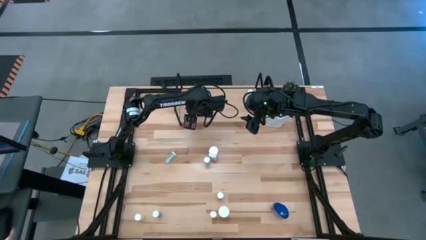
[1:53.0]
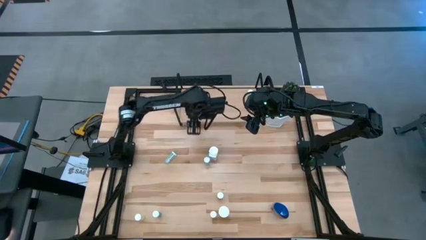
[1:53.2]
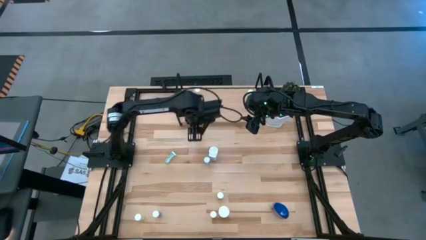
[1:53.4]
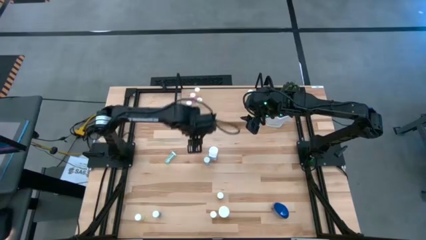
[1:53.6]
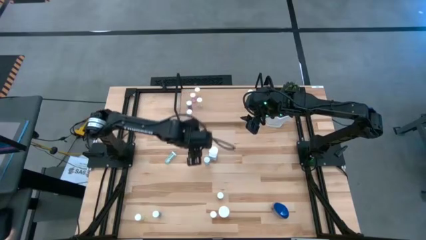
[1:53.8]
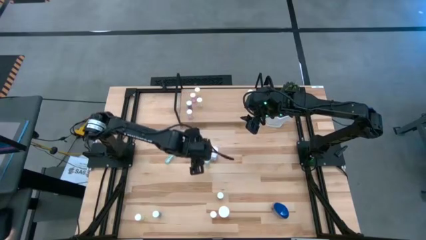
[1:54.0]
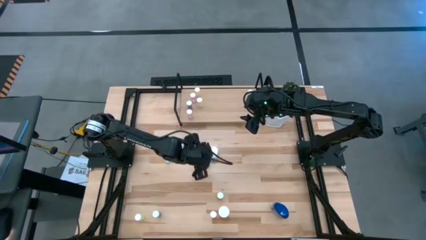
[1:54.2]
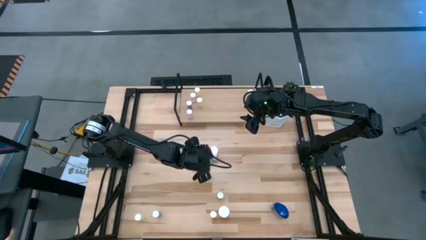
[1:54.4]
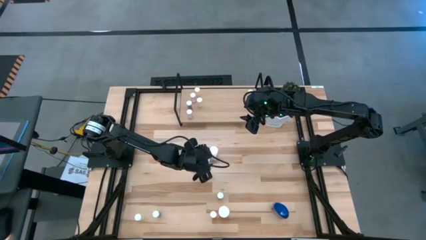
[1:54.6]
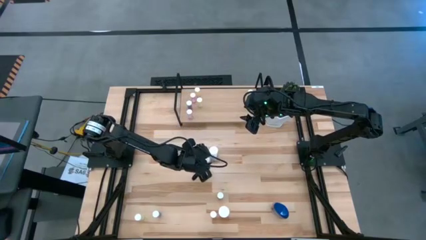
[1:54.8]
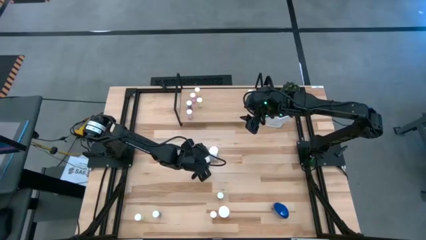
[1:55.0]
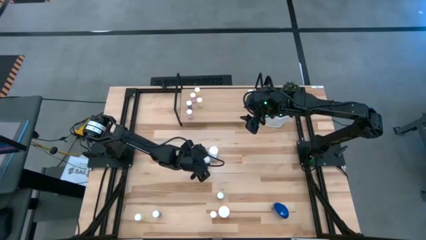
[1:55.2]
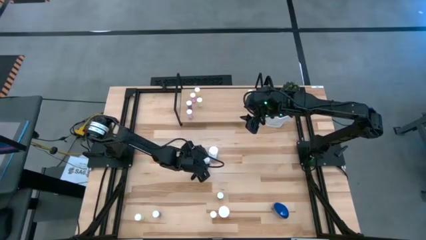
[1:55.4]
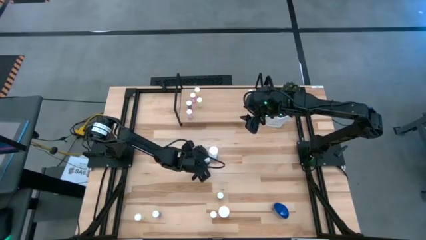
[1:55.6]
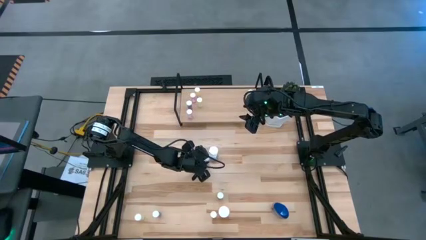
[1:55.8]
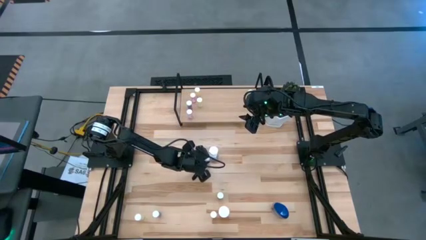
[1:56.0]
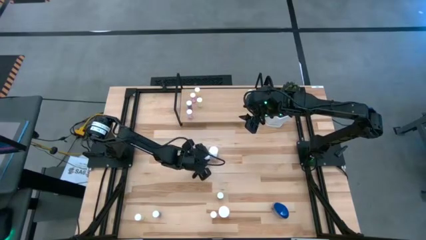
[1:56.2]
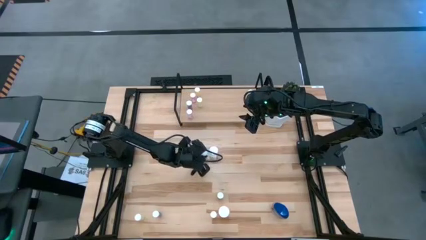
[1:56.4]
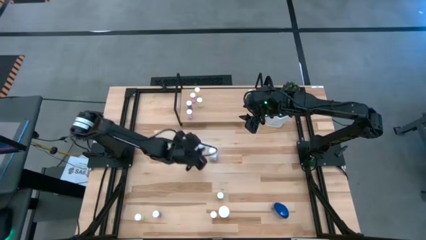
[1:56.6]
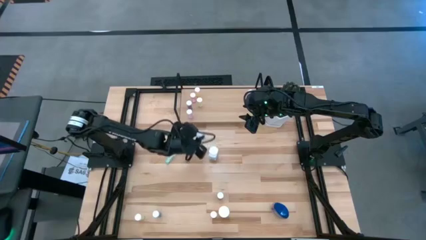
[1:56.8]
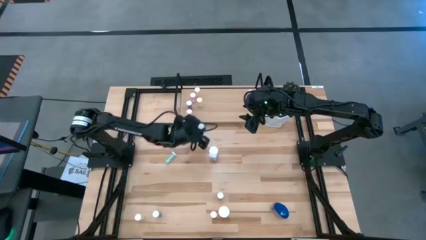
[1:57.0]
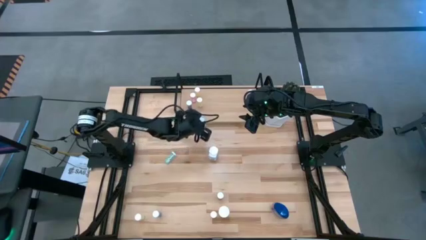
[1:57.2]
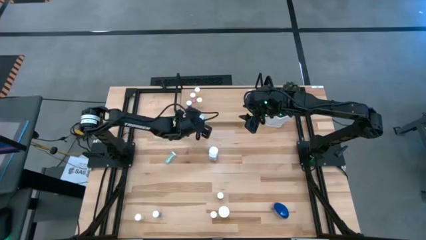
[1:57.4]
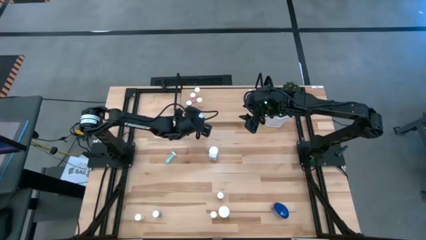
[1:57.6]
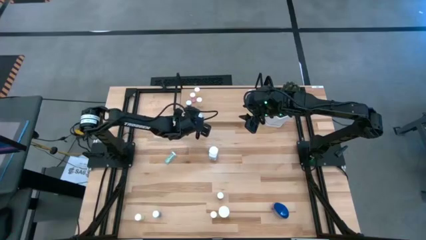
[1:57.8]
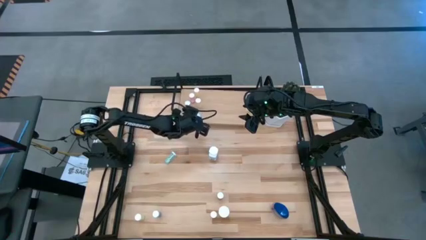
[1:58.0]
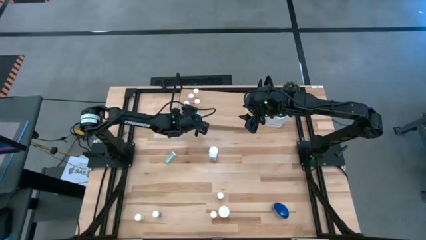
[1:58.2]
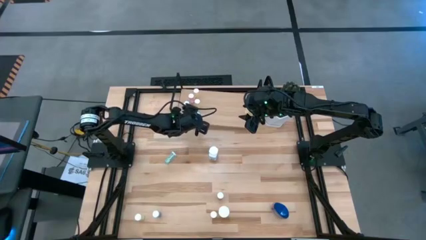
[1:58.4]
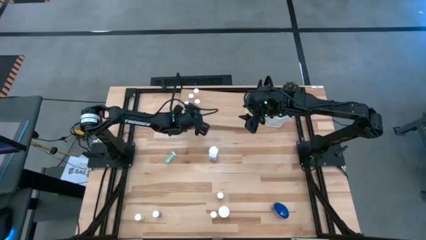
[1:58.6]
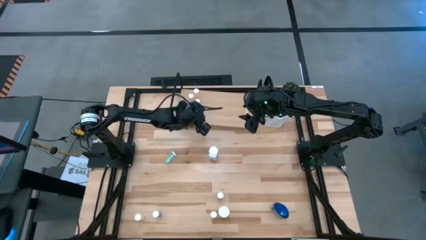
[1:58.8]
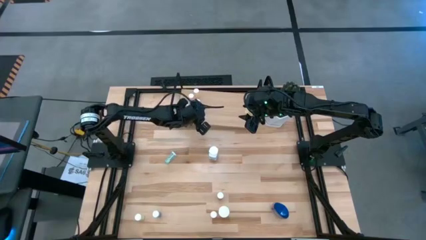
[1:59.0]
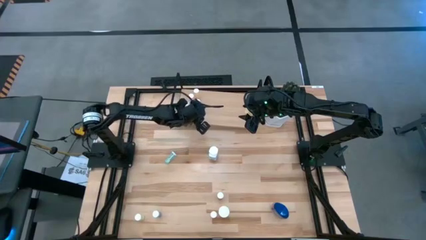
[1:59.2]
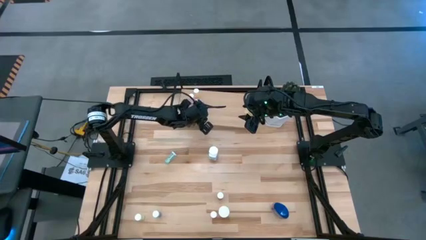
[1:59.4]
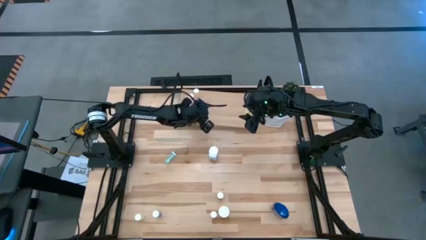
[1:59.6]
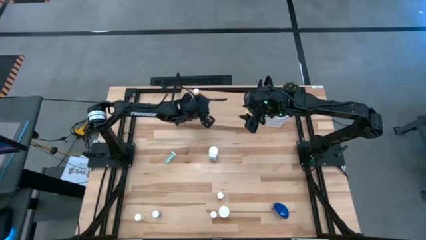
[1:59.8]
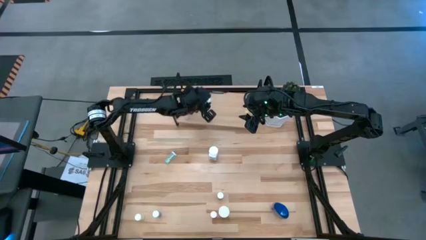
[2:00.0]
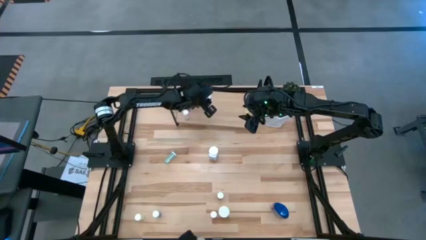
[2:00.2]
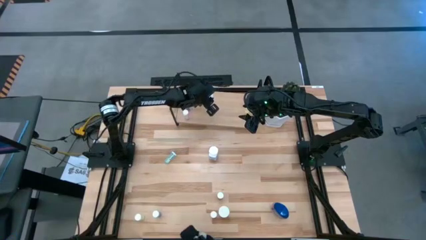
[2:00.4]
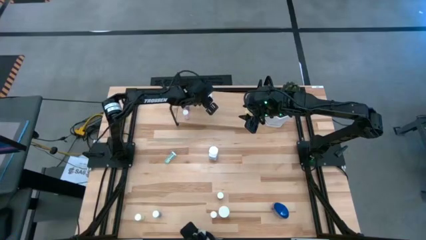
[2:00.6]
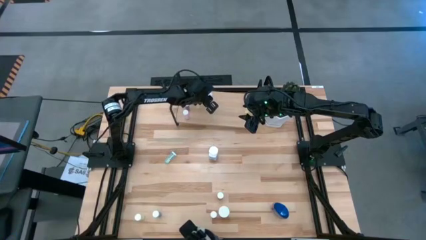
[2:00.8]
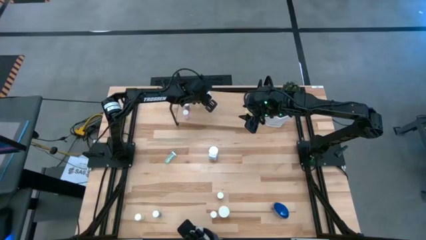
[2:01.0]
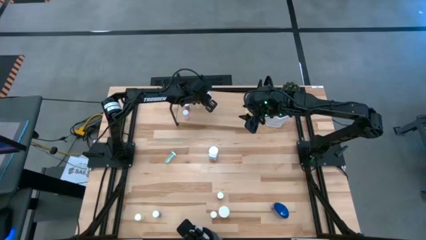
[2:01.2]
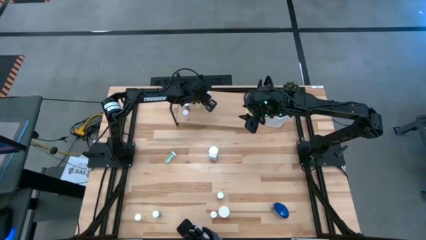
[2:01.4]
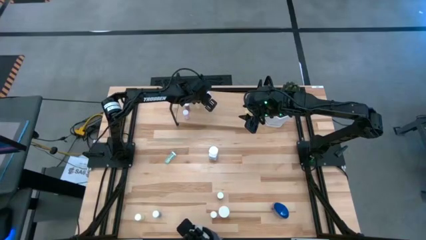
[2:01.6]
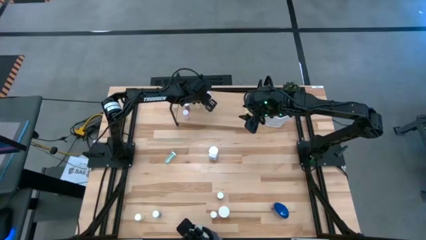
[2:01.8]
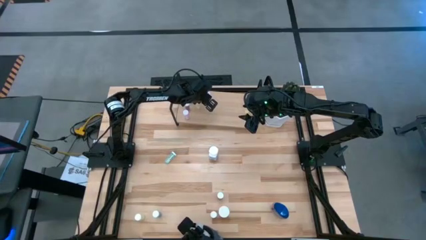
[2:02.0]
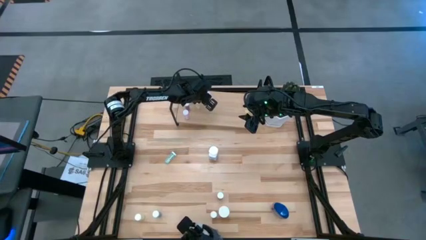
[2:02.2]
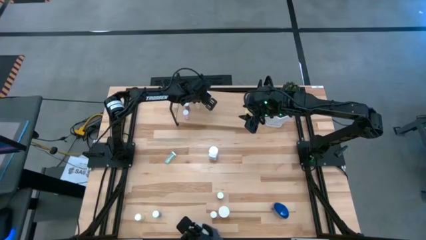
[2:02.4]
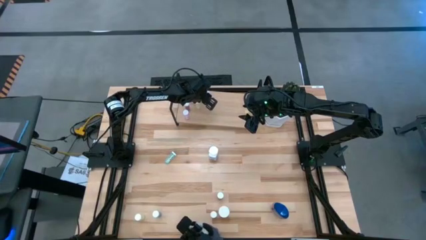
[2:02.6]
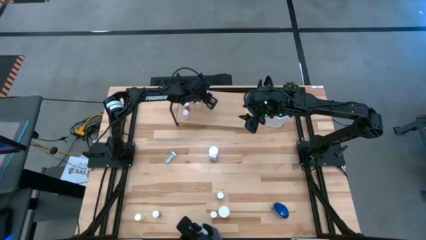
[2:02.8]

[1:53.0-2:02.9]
Task: Pick and place medicine bottles onto shelf by color
Put the blue pill bottle on the shelf

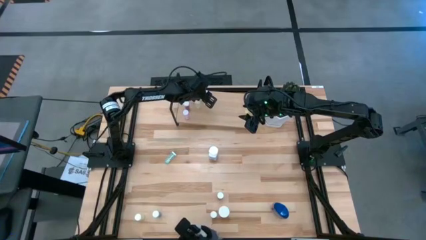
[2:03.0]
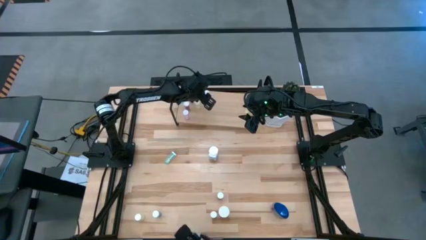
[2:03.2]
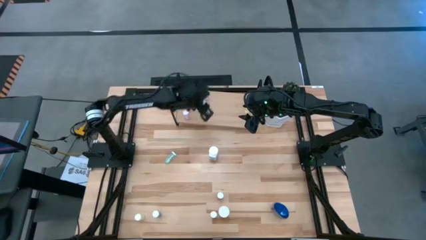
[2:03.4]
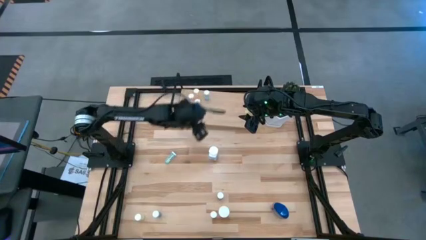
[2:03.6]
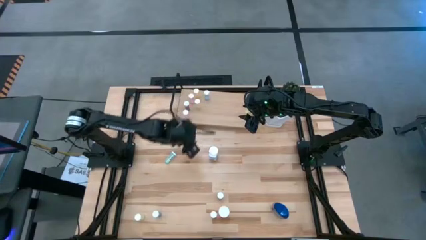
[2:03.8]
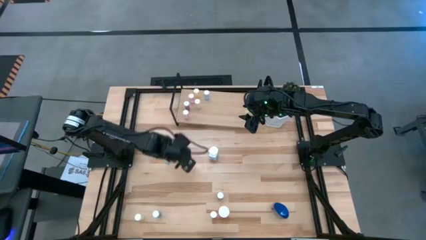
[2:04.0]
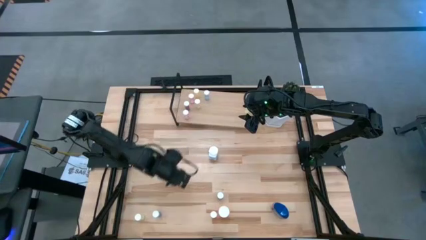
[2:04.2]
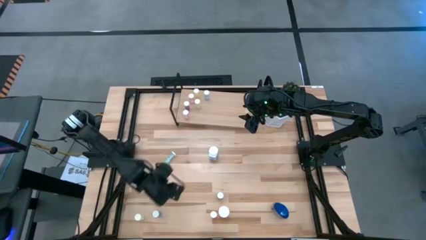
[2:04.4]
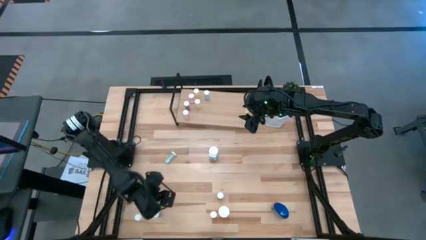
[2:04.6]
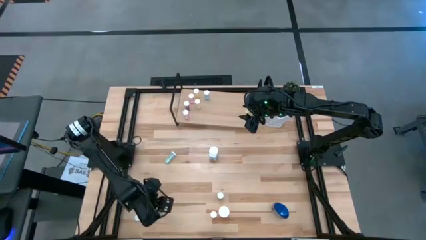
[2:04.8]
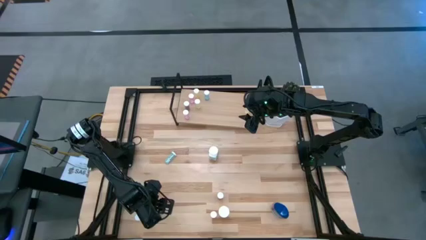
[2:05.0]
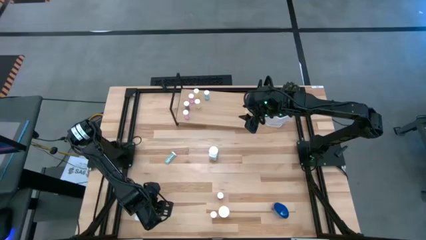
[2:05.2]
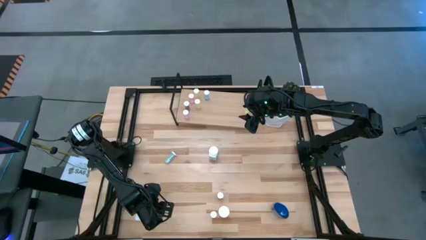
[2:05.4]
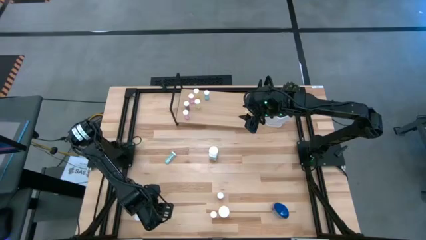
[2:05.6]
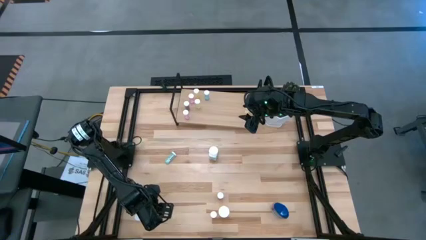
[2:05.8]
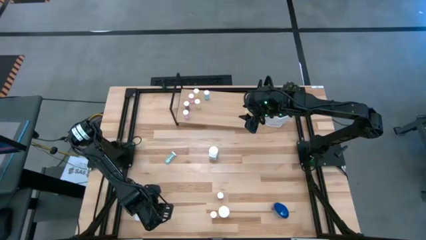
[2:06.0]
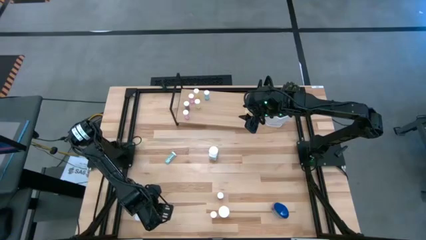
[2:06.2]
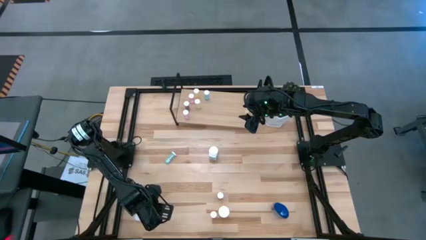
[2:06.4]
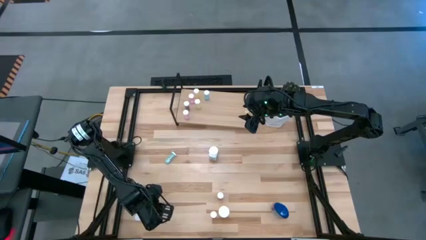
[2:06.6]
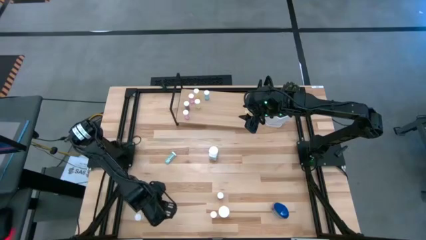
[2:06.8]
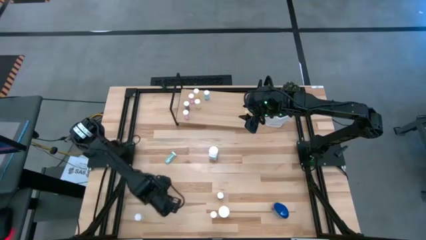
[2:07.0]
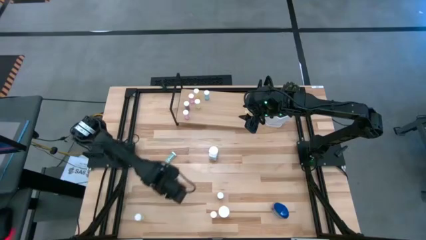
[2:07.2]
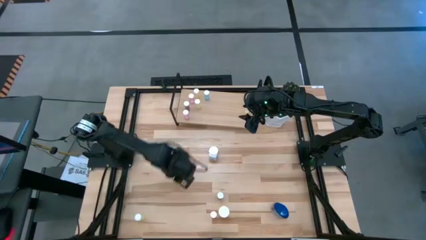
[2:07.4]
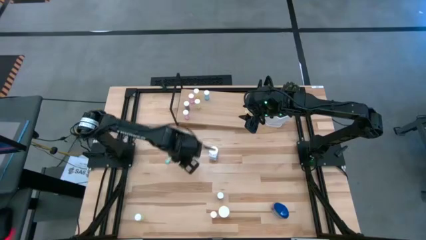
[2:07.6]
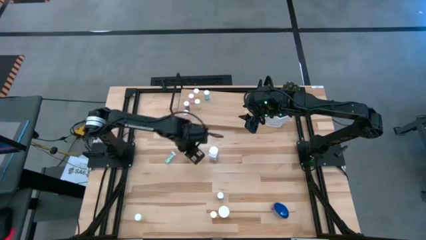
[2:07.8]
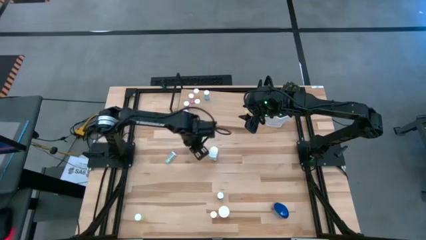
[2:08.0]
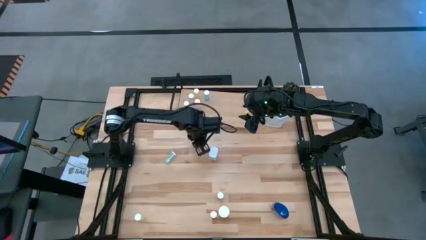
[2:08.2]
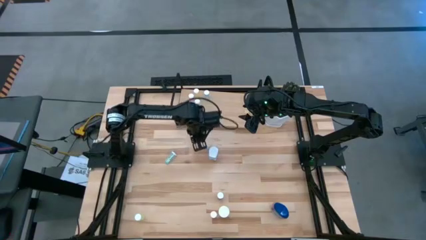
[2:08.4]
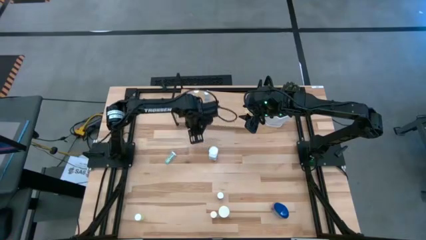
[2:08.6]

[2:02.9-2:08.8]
Put the blue pill bottle on the shelf
